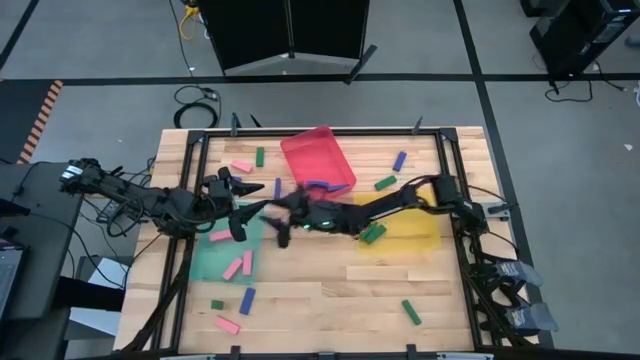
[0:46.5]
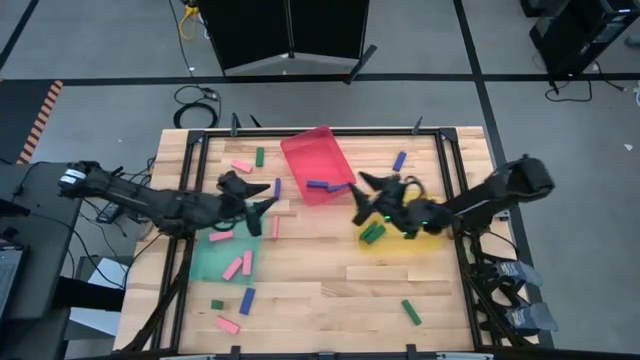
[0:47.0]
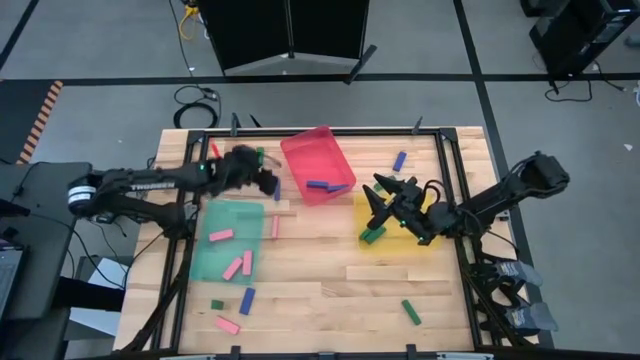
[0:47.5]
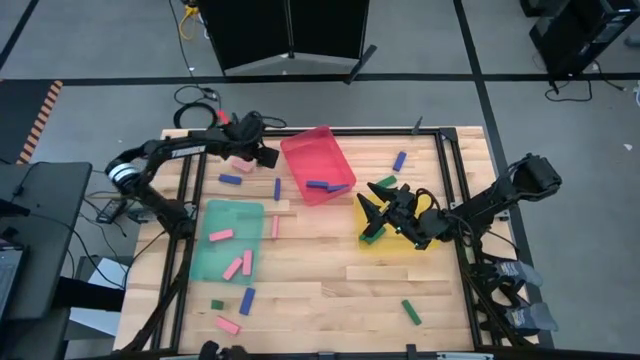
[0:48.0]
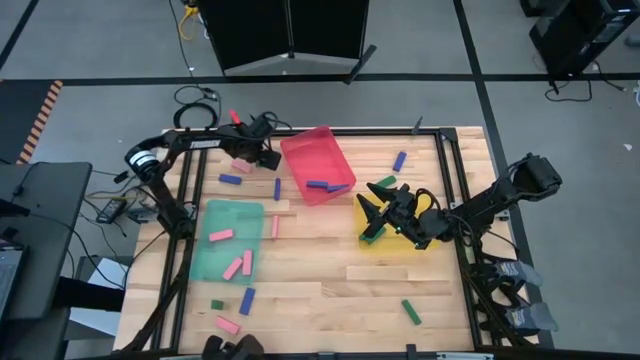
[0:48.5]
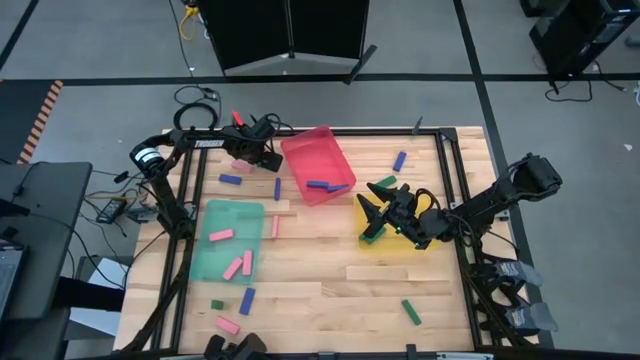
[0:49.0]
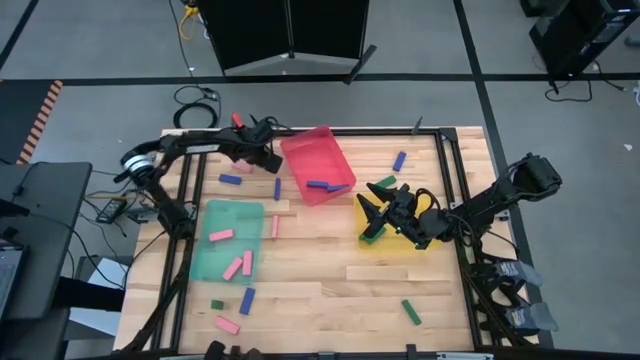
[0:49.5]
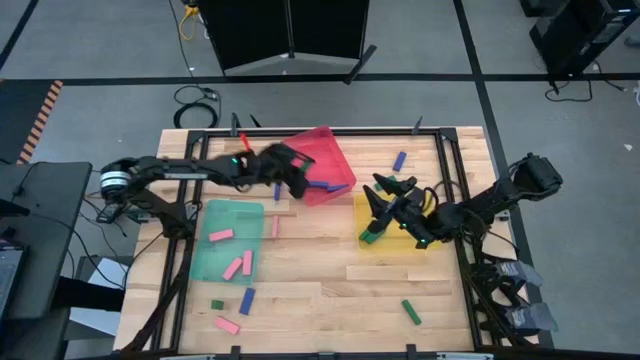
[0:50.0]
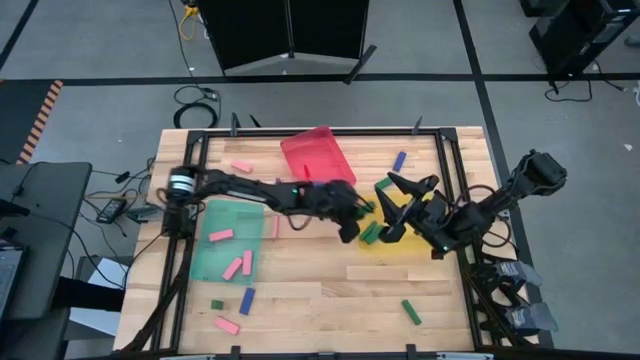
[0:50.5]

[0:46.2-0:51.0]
Task: Sort blocks
Put the green block into the yellow bin

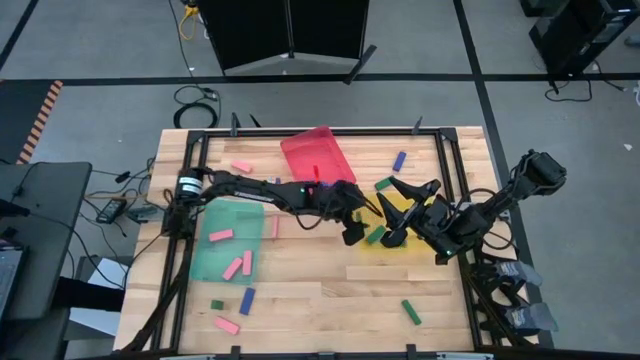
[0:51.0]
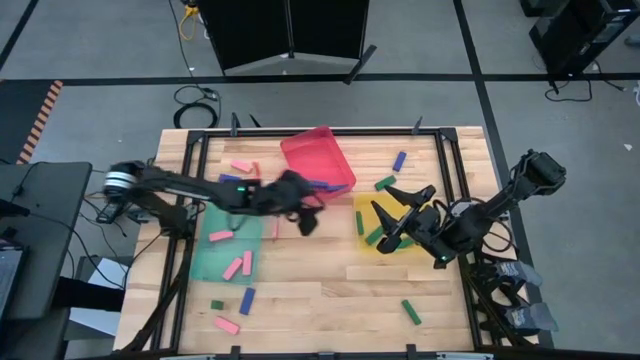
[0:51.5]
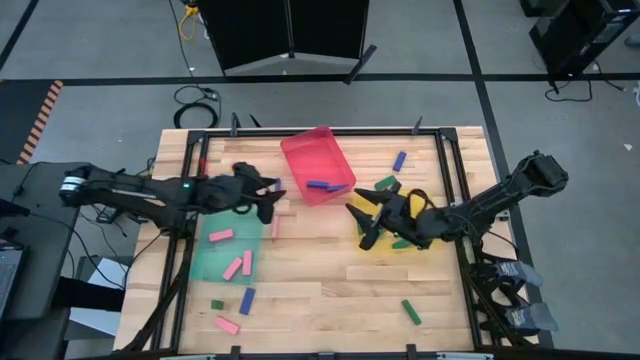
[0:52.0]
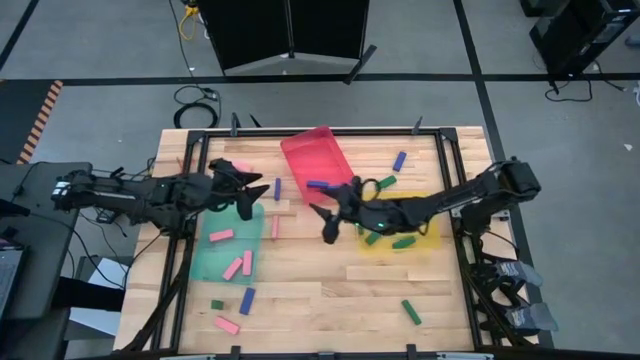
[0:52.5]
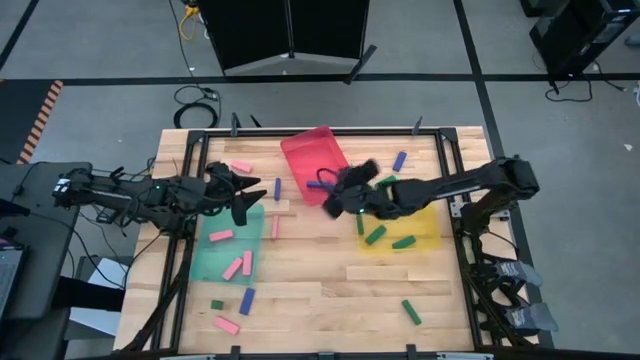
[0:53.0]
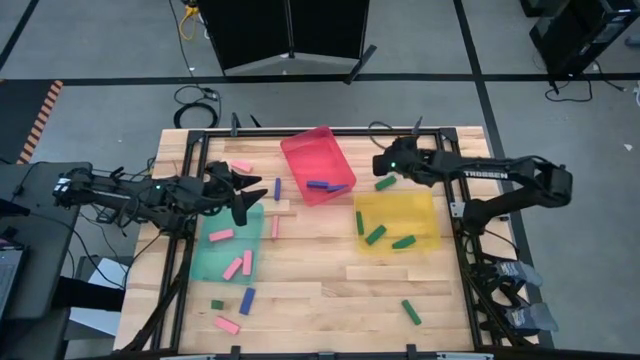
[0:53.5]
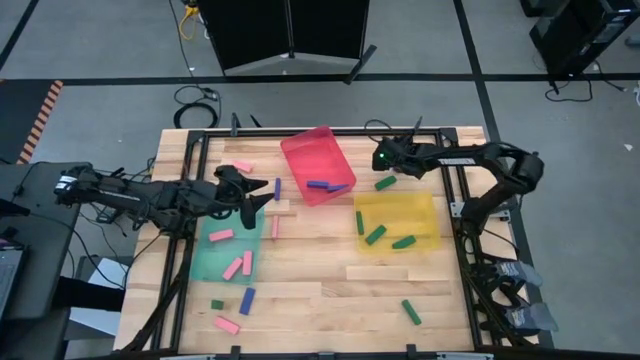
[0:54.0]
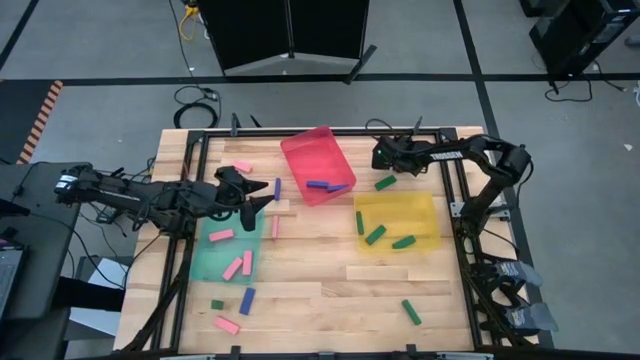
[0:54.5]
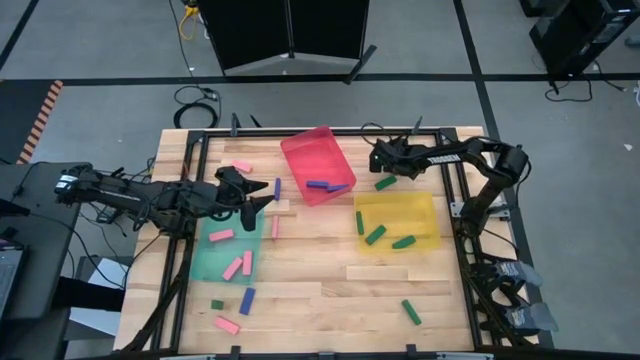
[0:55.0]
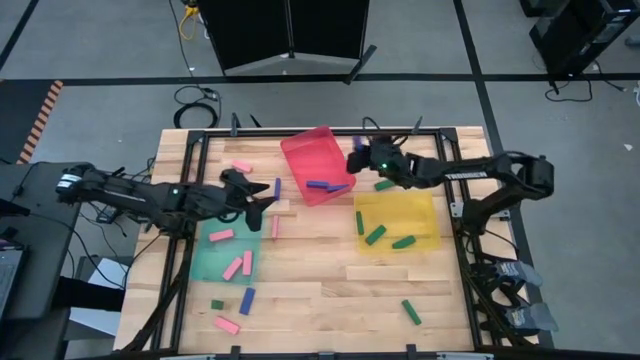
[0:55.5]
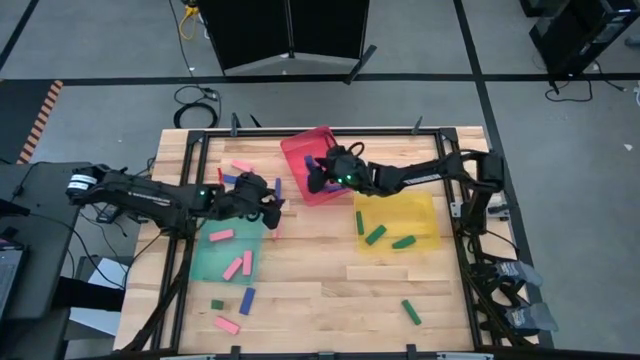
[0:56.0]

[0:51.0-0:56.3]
Put the blue block into the red bin

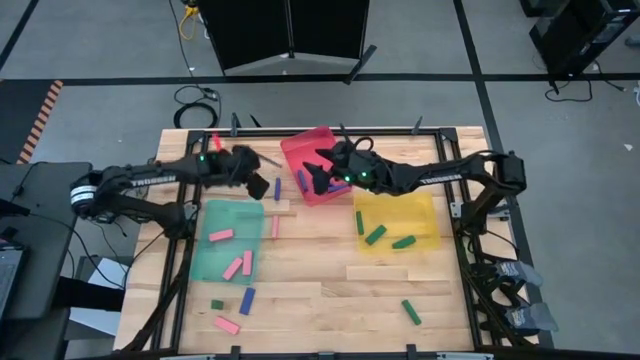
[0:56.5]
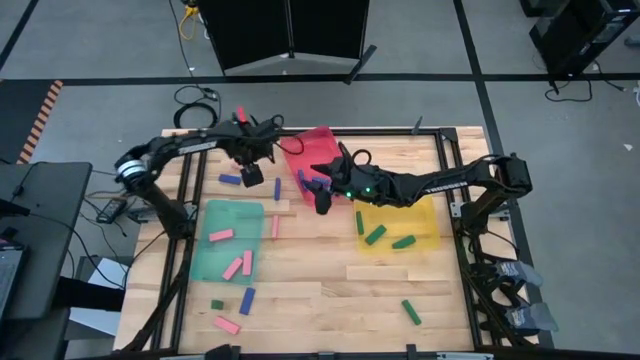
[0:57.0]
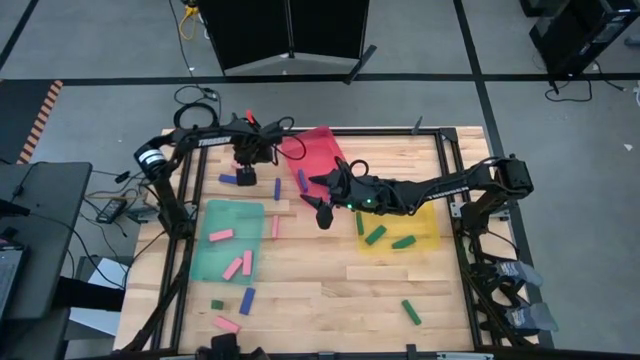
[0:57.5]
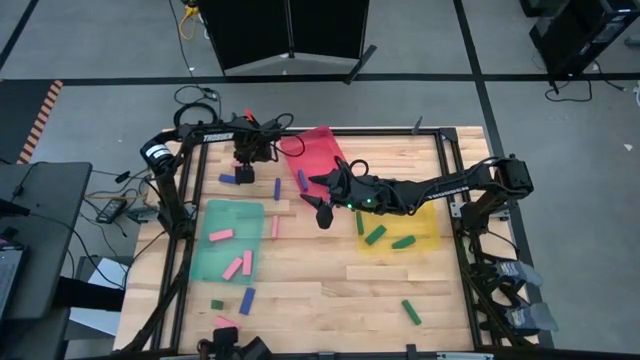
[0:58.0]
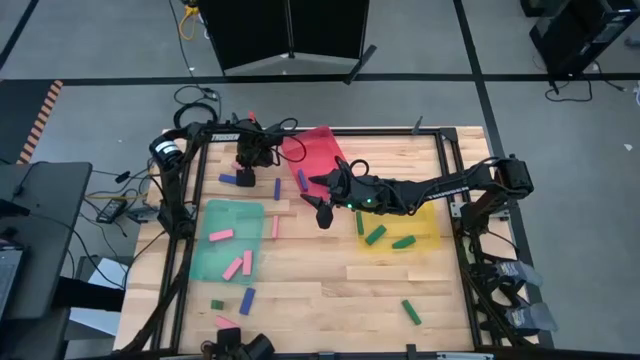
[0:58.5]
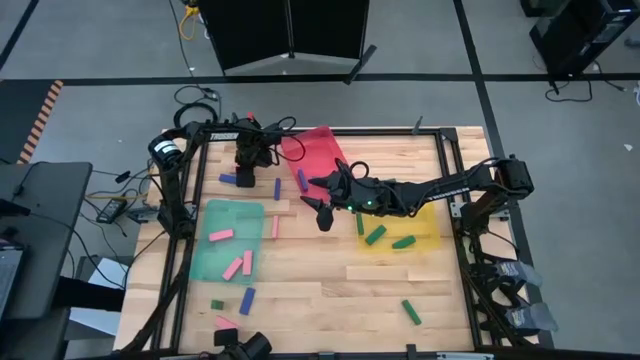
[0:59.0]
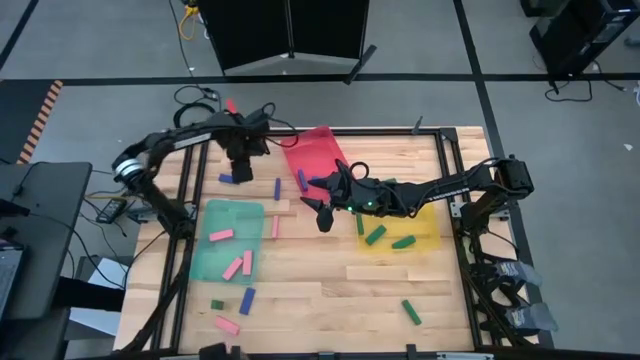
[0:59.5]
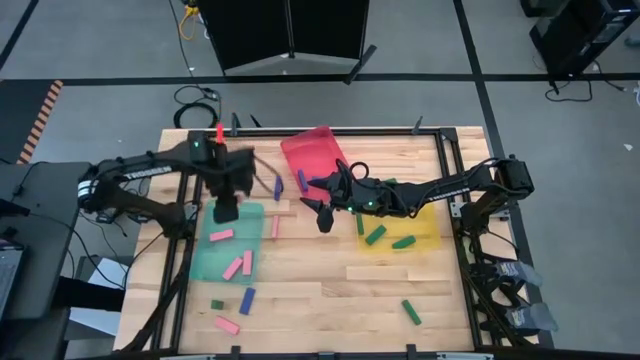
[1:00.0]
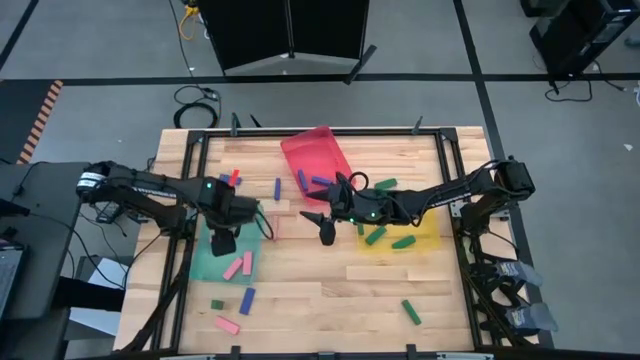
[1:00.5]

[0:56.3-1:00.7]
Put the pink block into the green bin

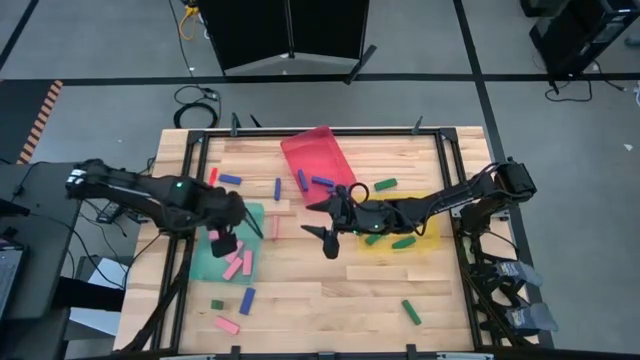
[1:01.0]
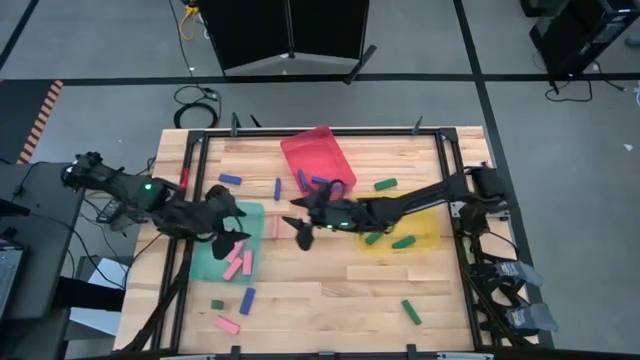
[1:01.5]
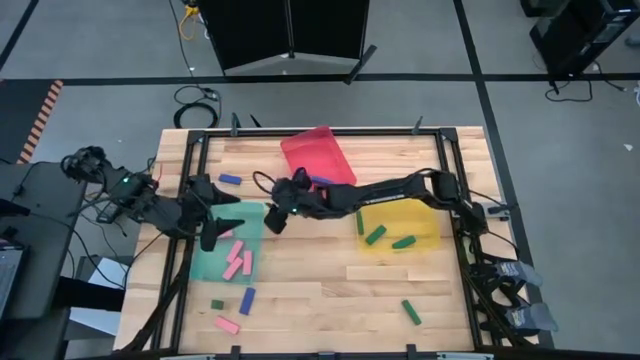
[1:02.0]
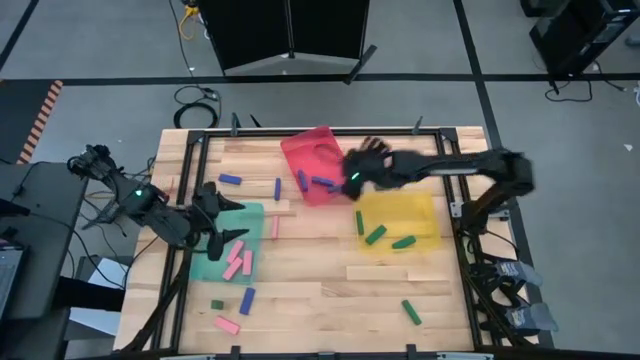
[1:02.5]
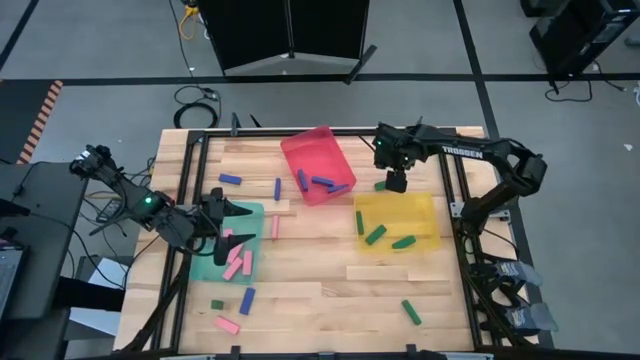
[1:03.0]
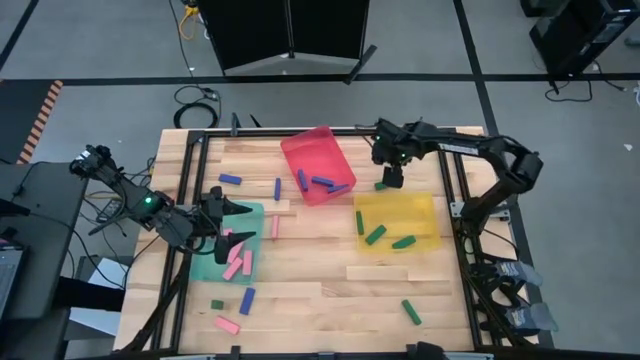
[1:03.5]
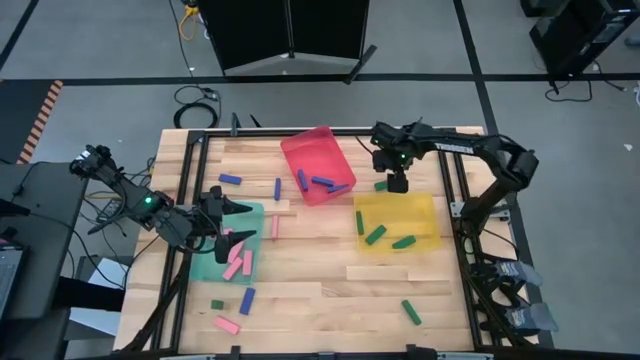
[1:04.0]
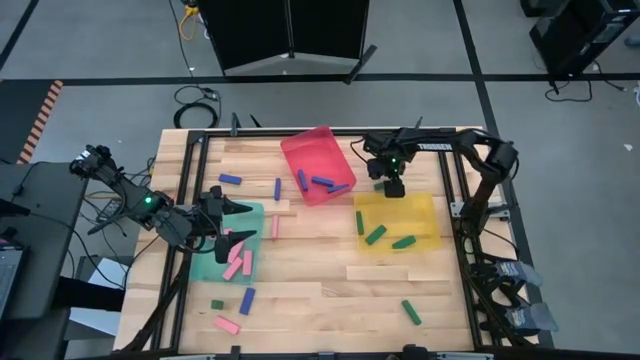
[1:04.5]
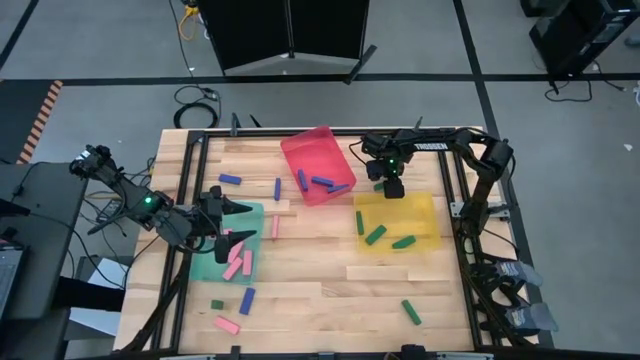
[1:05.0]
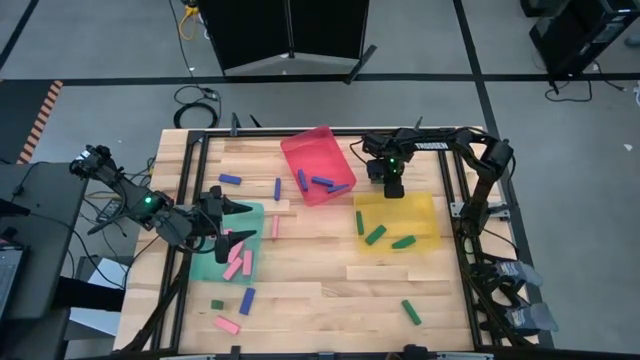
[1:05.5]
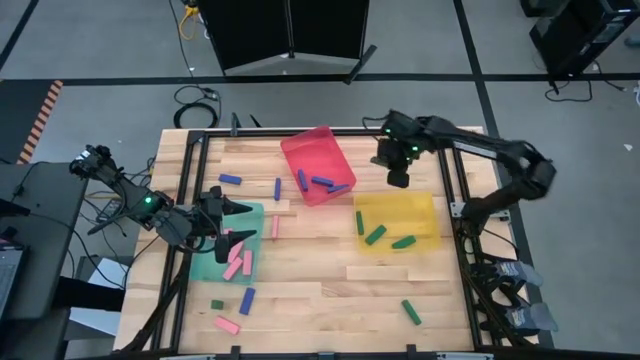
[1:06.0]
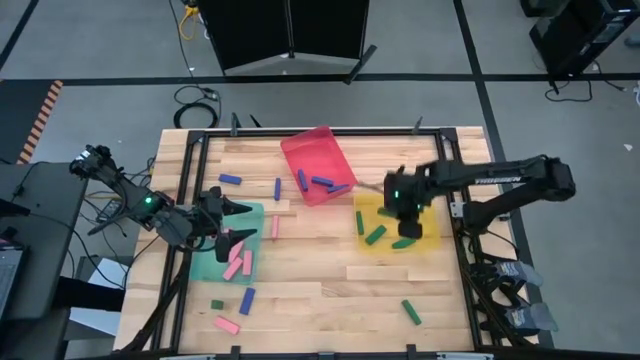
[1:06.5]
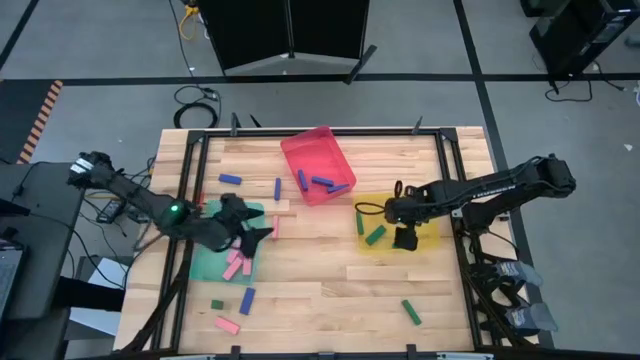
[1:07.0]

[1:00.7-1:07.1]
Put the green block into the yellow bin

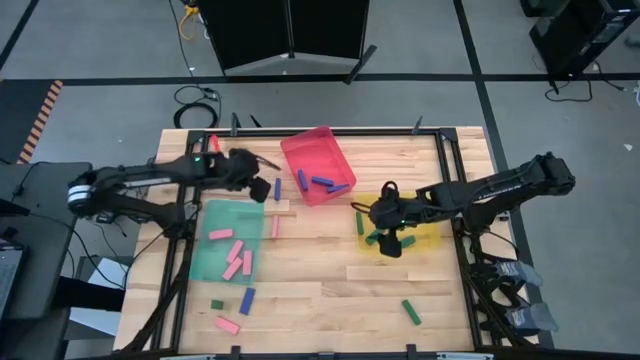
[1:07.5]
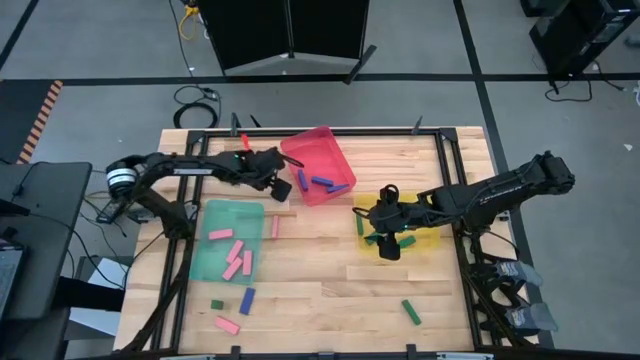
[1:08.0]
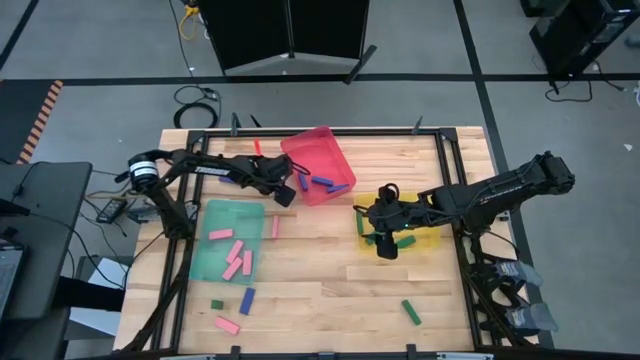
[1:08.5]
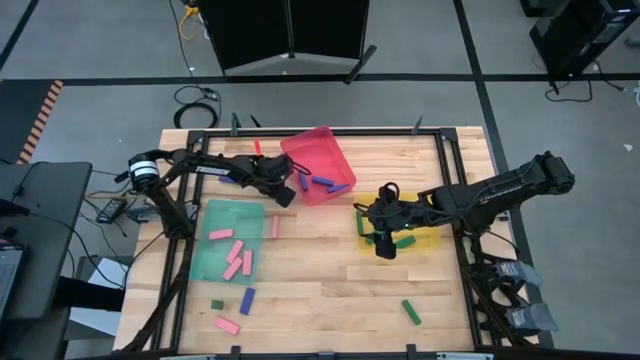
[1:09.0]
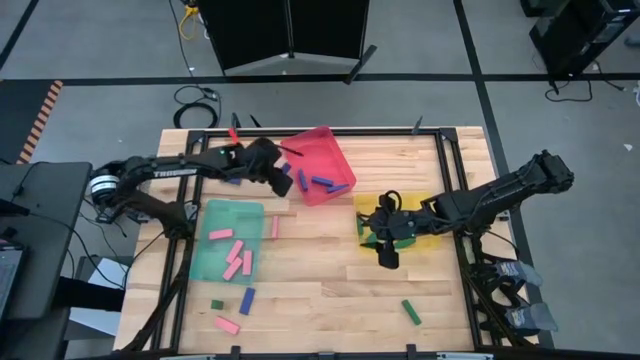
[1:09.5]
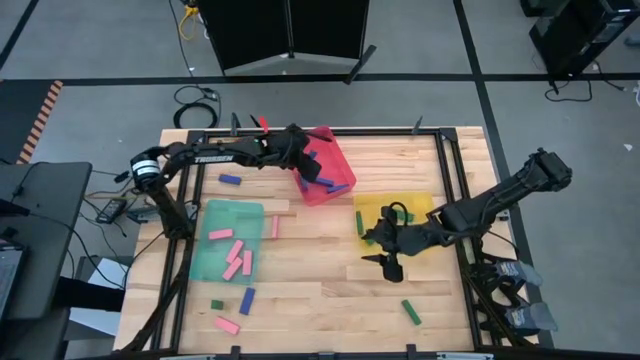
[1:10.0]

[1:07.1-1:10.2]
Put the blue block into the red bin
